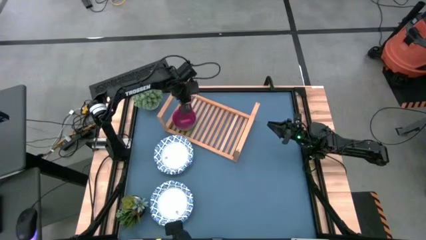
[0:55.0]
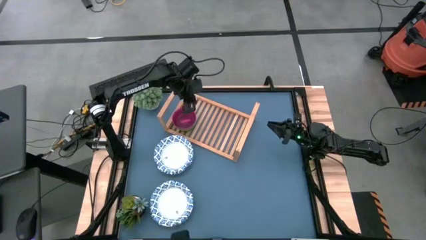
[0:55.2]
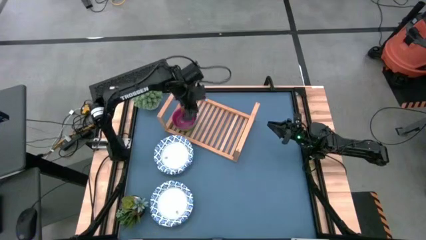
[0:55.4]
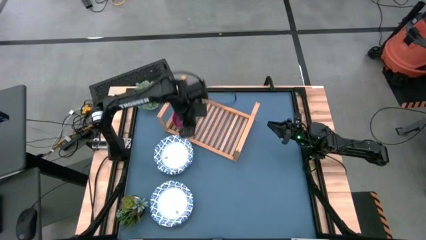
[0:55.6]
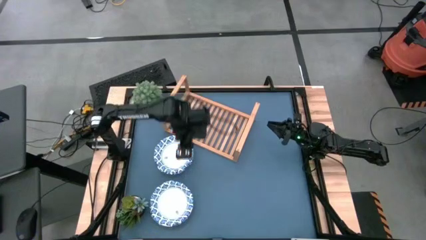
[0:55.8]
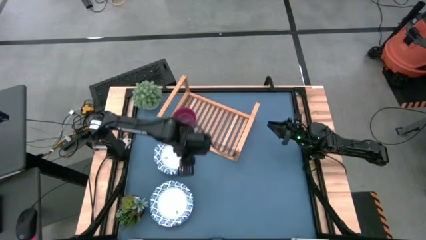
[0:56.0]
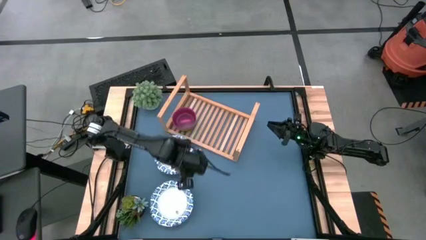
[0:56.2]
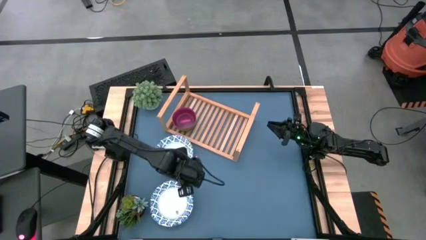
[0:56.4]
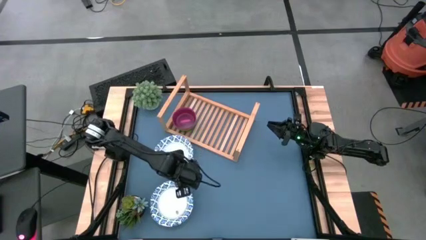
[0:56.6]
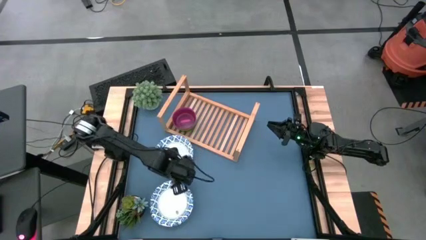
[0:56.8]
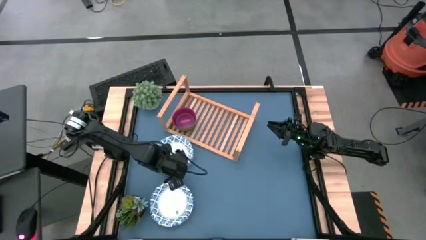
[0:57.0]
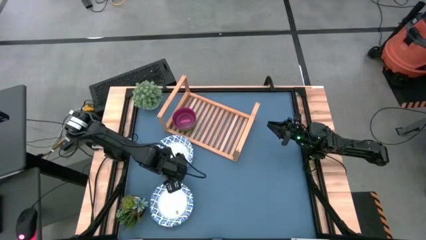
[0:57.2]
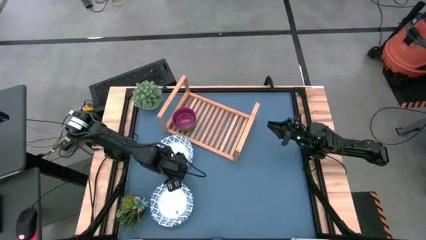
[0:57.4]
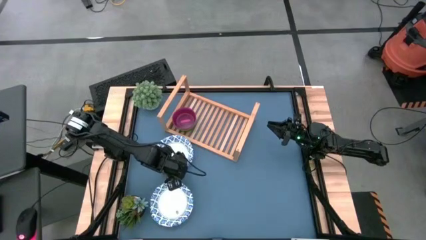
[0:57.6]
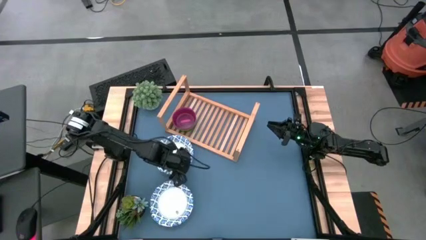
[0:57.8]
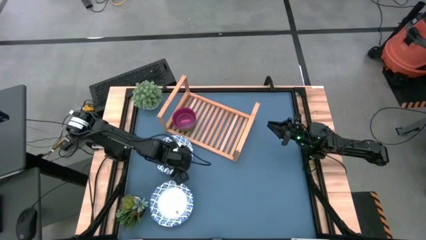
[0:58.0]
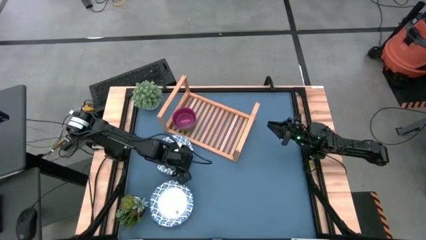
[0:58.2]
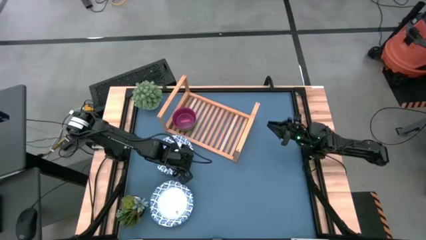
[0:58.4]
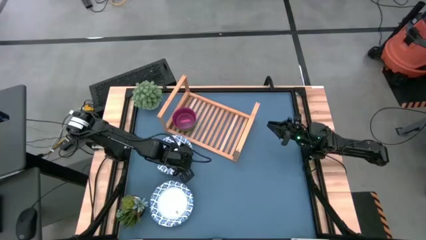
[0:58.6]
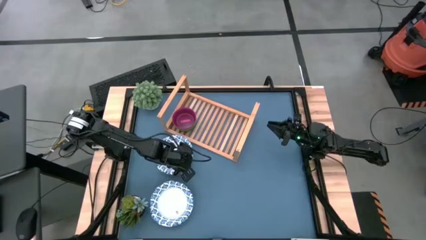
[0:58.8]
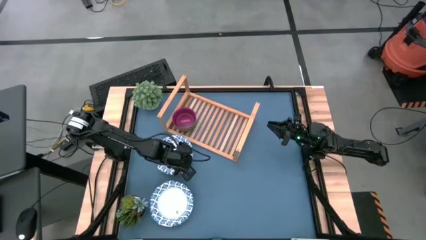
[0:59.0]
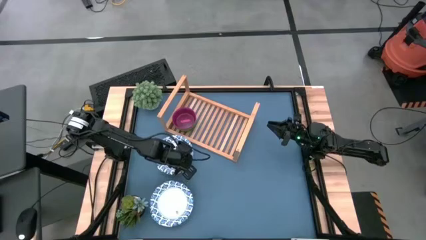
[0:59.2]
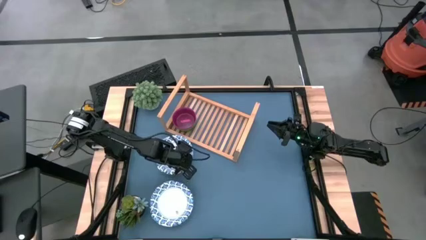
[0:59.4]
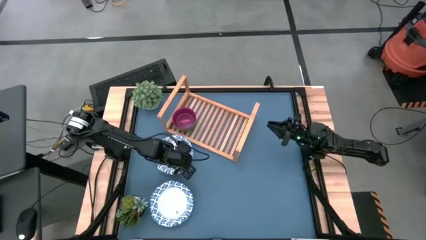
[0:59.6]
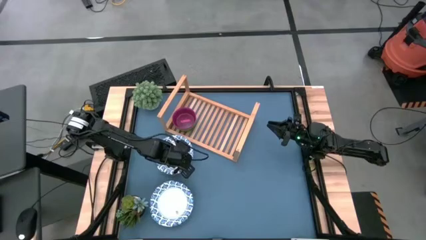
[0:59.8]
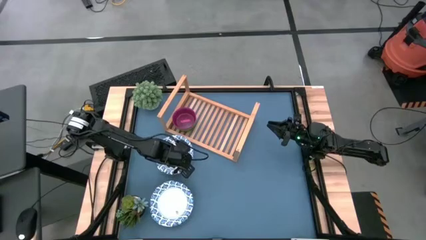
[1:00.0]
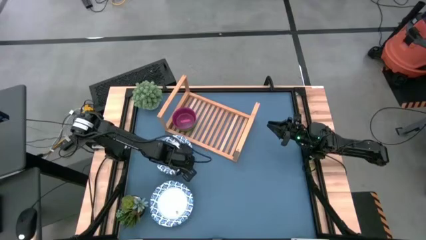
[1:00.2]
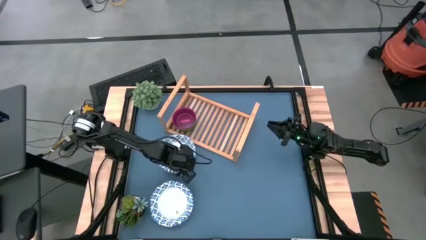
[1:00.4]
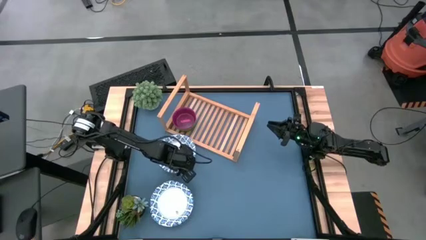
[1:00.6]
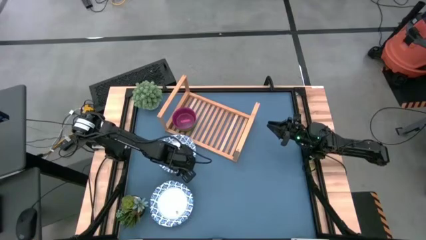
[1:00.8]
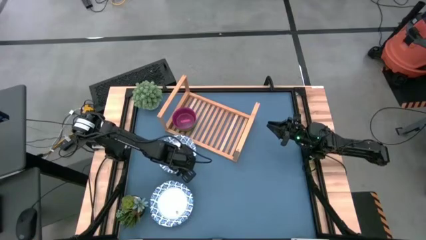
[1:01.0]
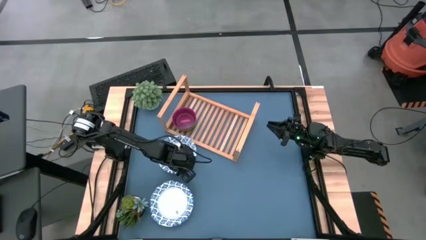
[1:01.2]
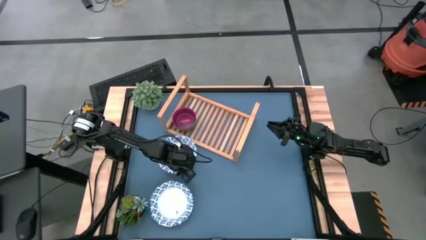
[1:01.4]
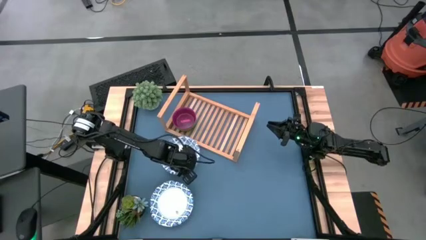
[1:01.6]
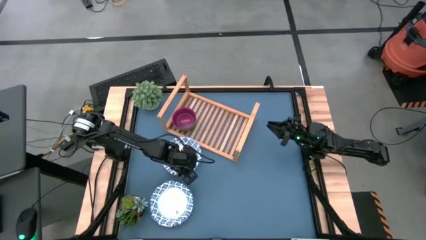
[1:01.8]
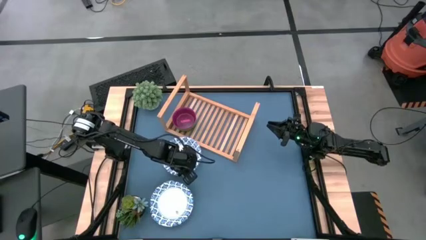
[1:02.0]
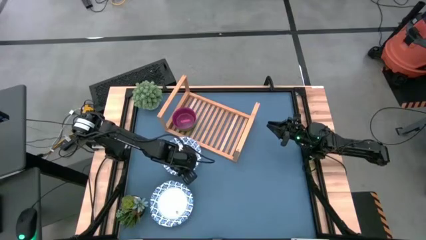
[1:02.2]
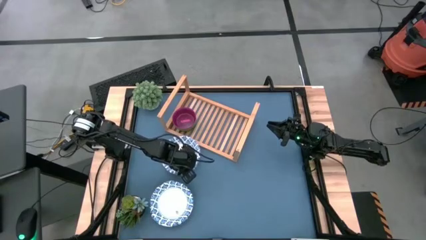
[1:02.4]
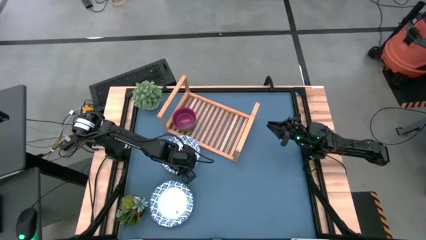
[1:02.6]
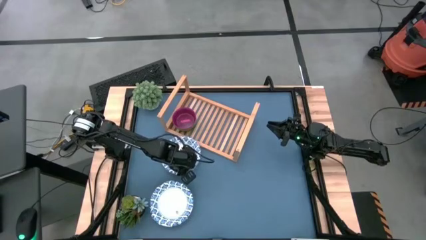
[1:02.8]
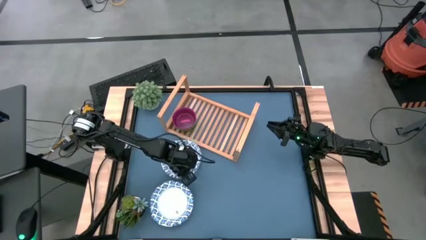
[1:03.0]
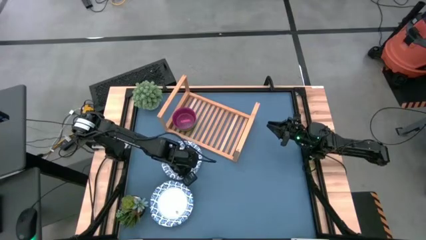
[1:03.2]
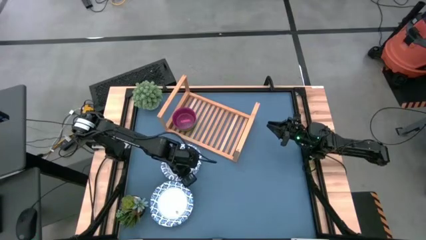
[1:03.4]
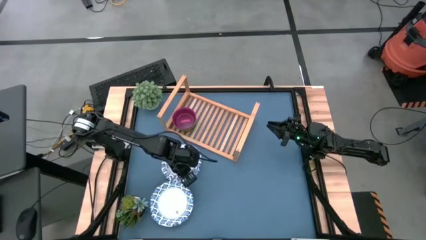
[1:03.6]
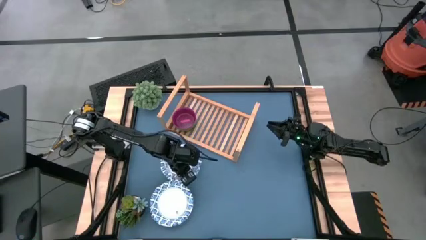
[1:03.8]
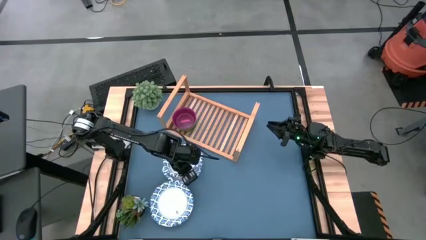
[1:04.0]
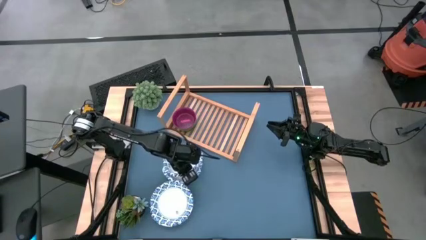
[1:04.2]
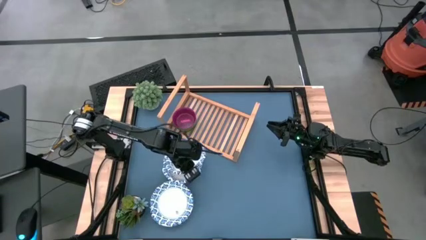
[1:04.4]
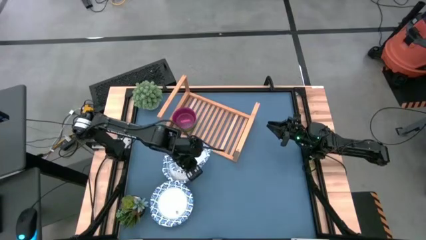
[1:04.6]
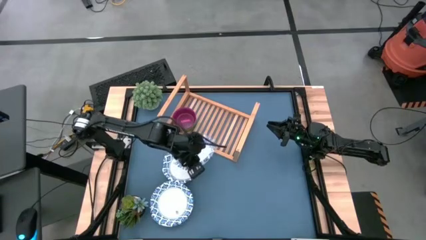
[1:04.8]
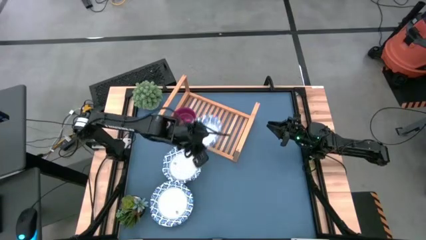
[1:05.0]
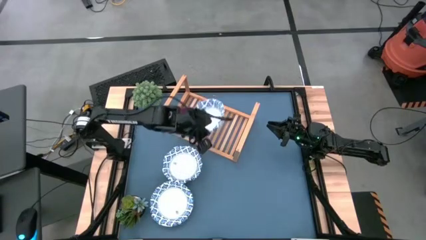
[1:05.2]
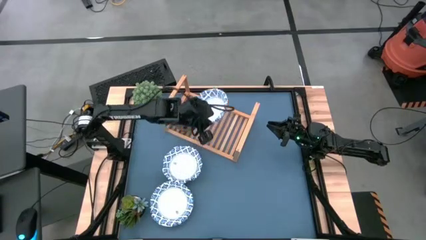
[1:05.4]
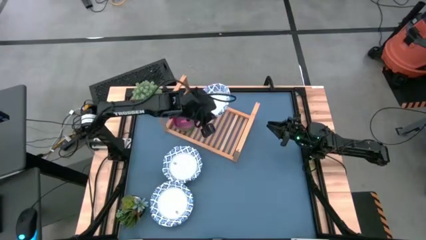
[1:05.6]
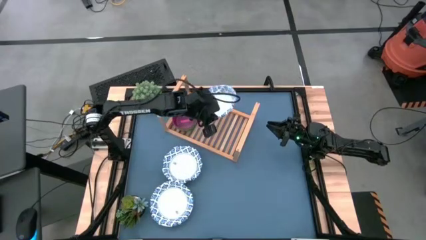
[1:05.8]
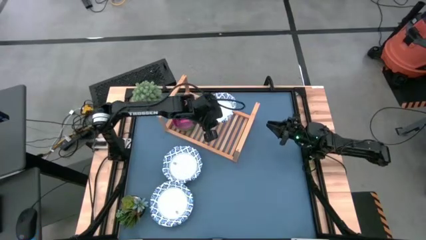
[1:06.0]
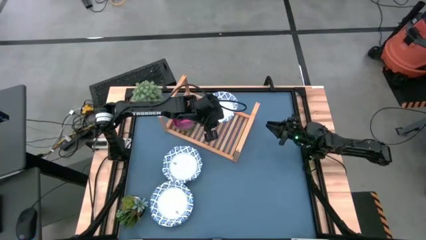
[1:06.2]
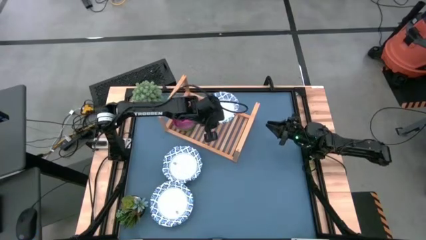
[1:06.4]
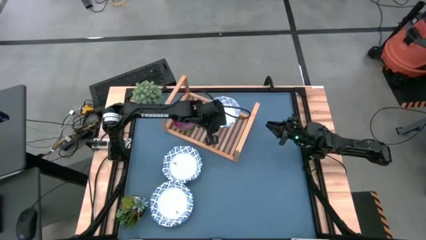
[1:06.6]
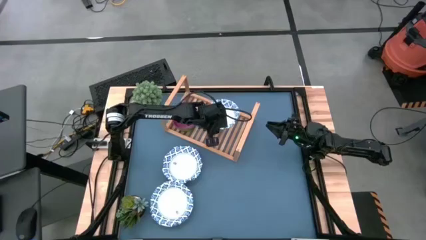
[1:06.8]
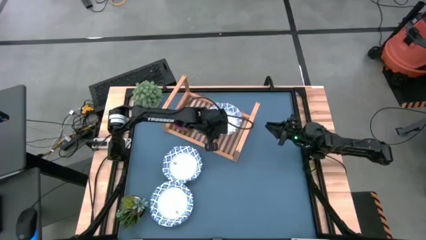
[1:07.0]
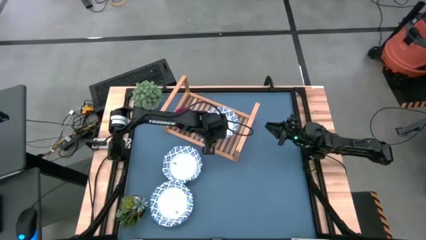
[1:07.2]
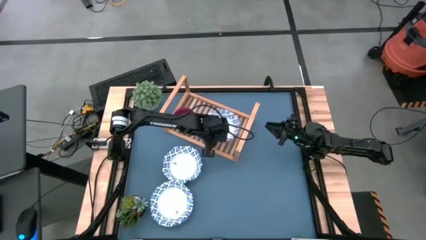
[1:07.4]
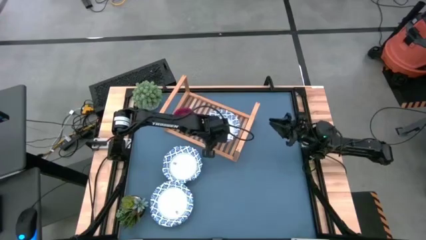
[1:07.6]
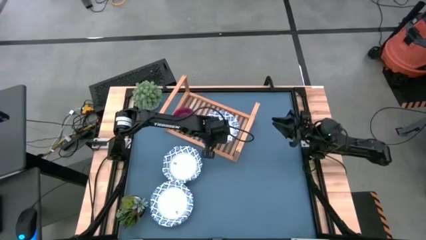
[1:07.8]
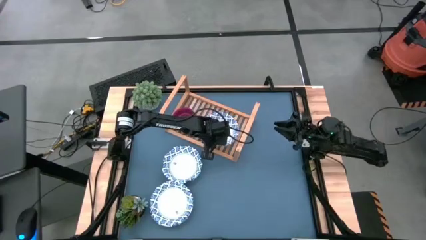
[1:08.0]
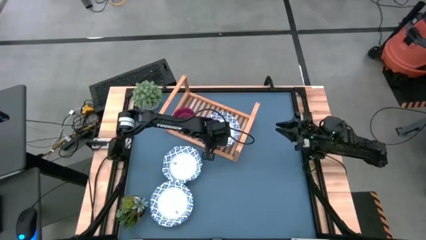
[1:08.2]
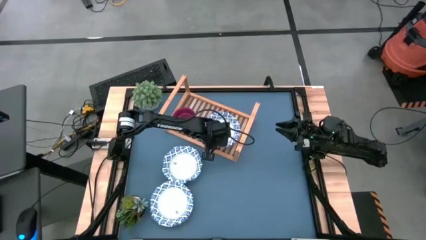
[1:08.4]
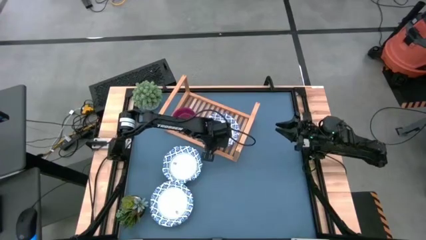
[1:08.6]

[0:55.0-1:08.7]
Task: Place and stack bowls onto a shelf
Put the large white bowl on the shelf
